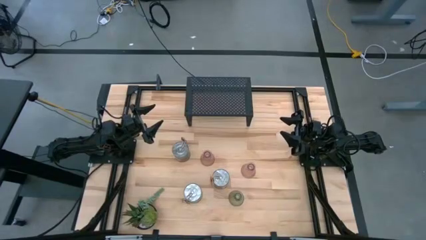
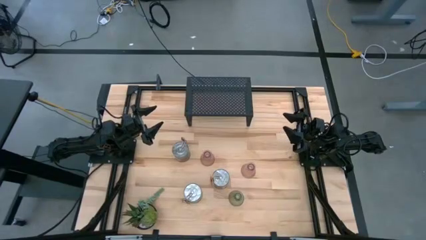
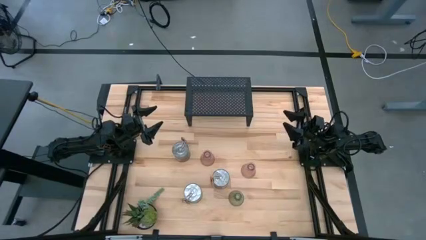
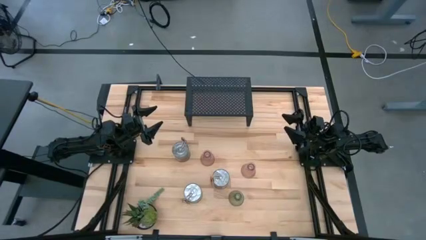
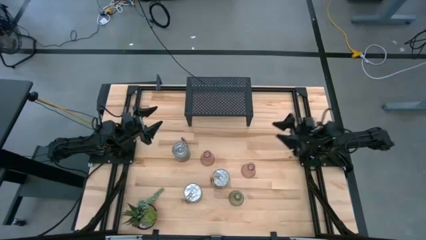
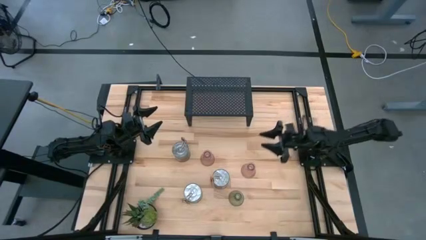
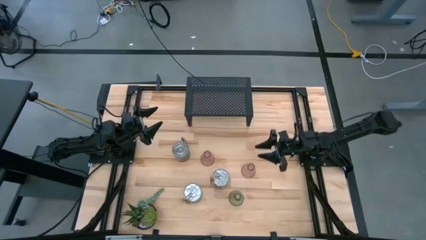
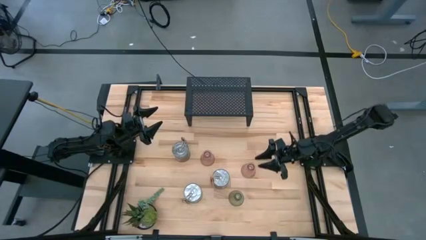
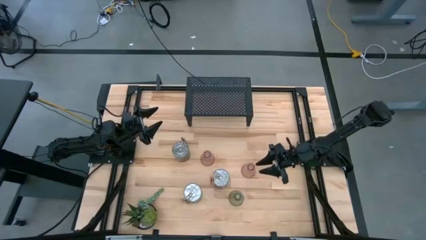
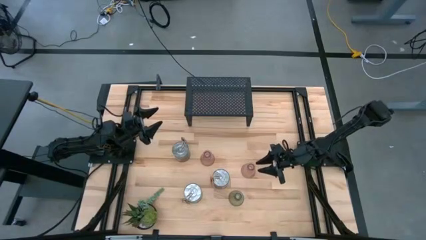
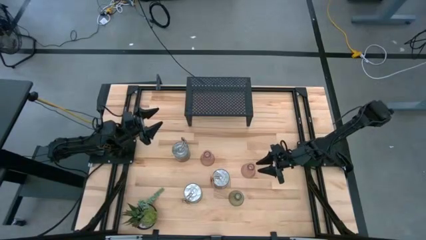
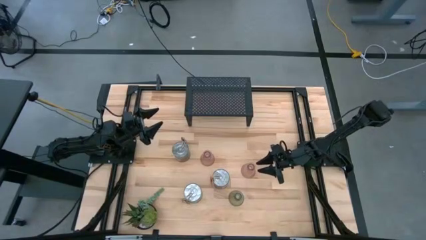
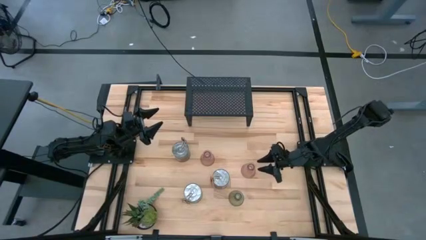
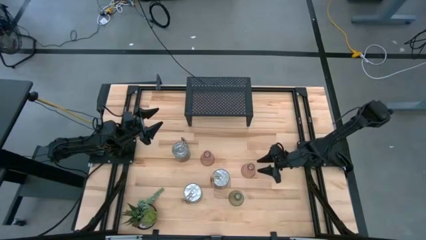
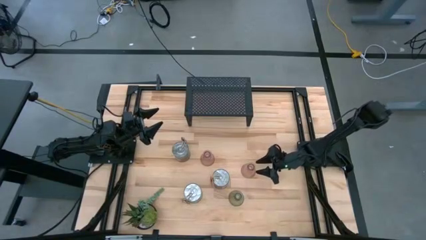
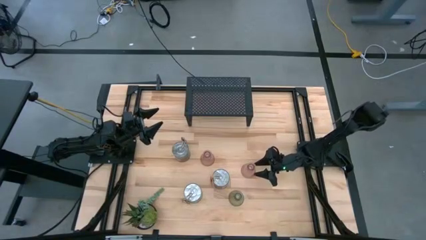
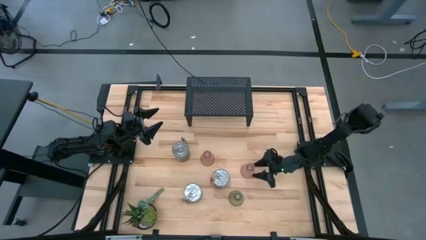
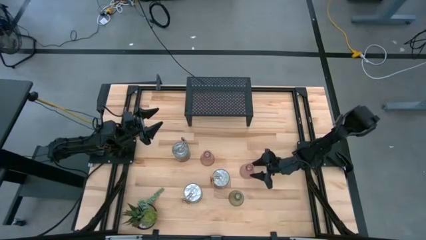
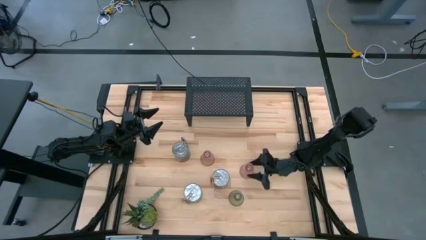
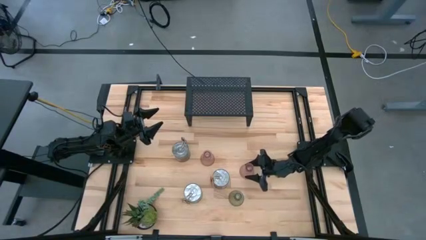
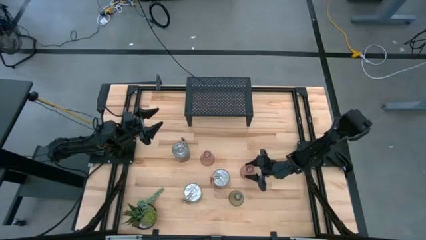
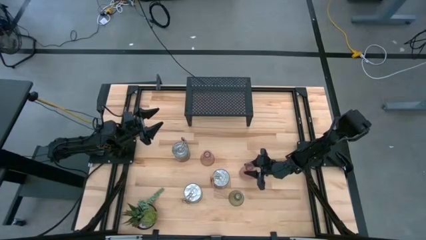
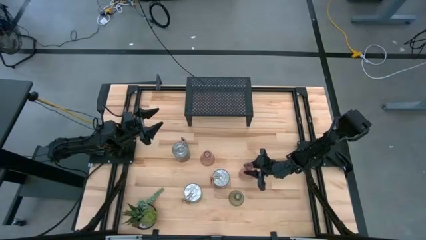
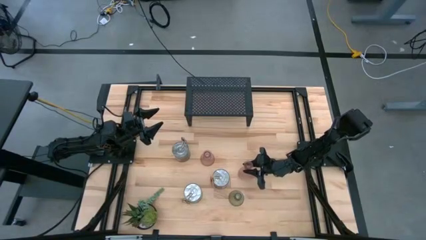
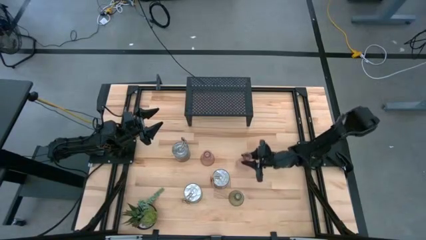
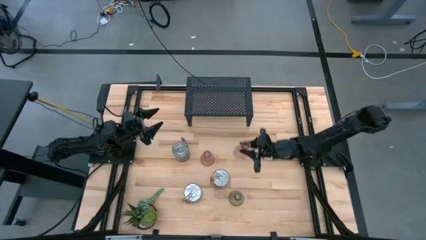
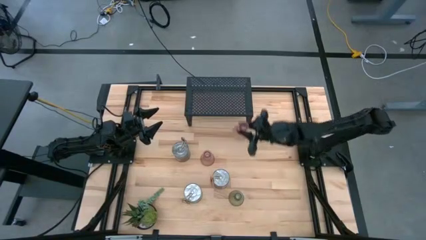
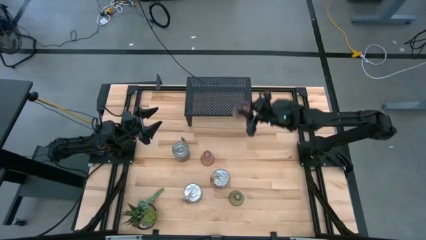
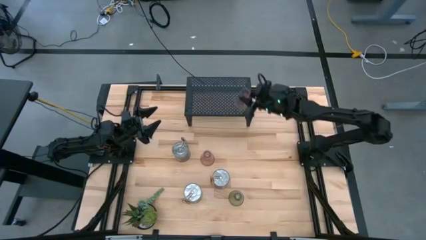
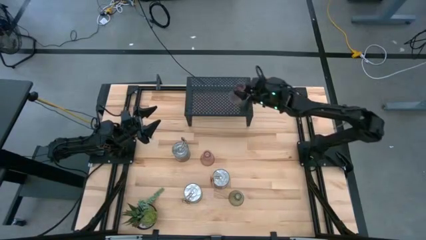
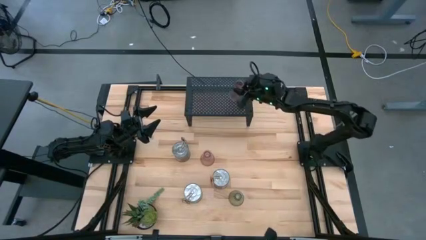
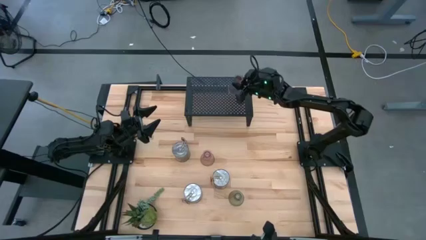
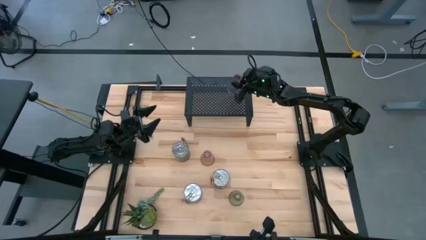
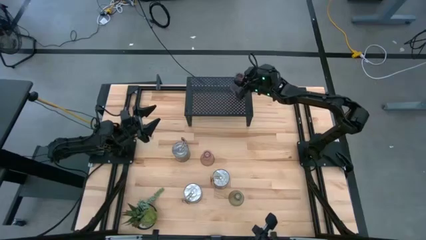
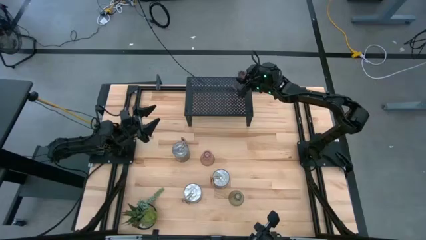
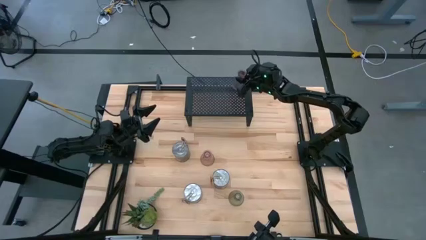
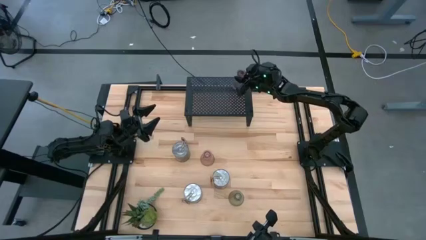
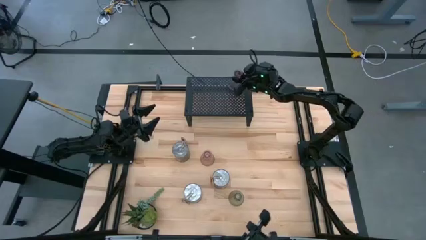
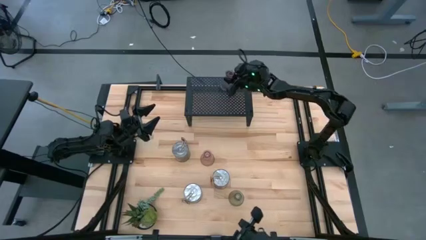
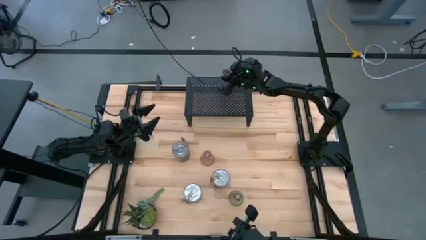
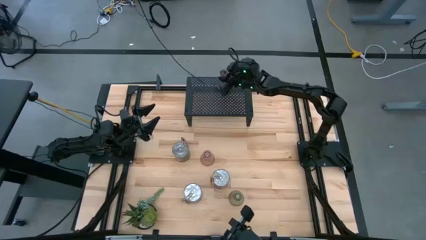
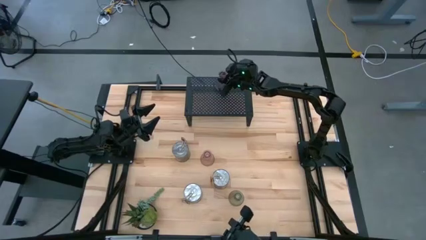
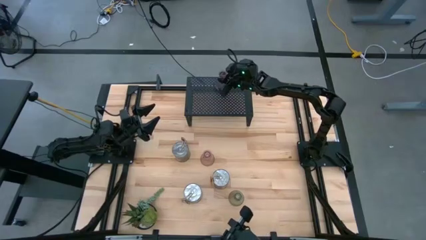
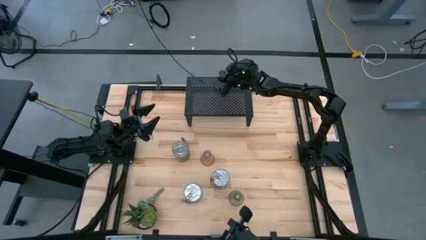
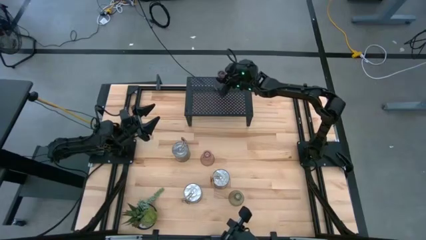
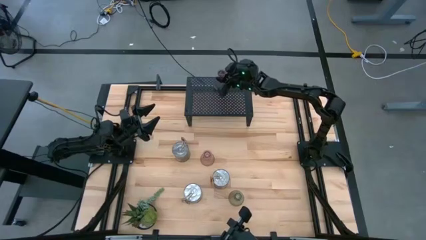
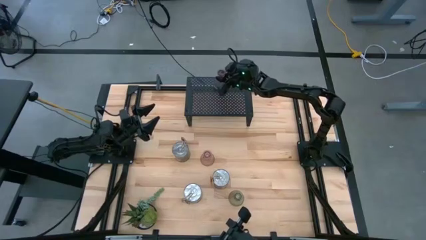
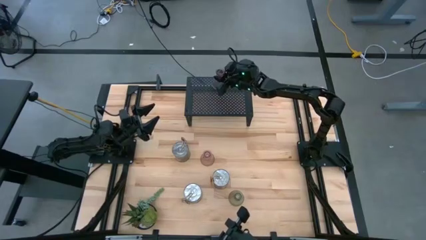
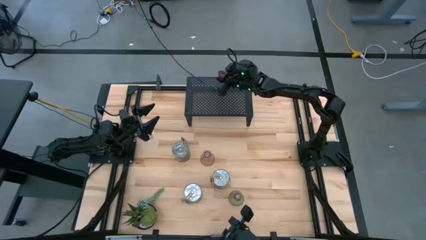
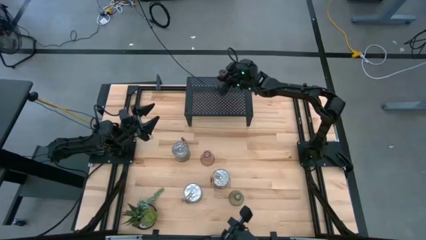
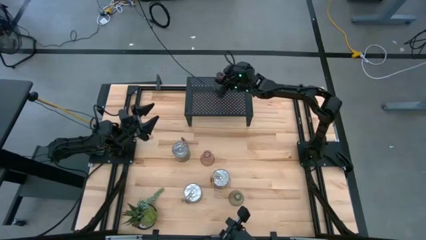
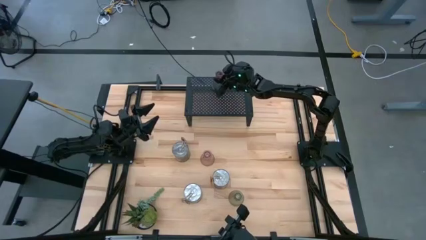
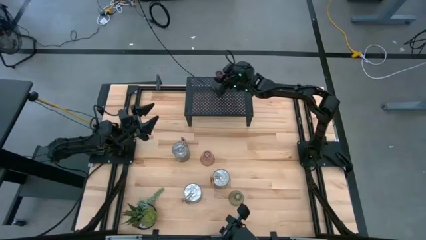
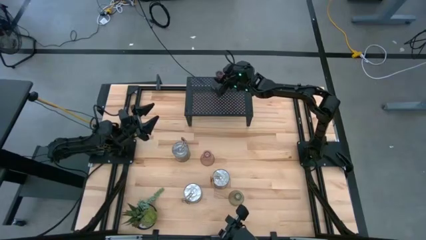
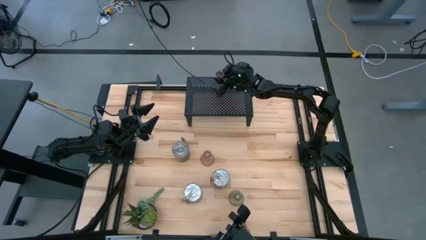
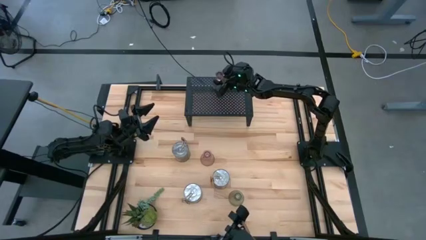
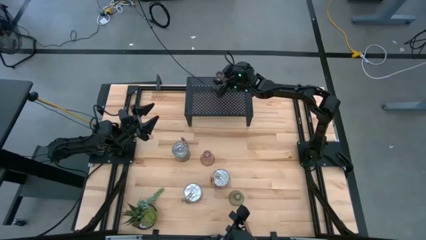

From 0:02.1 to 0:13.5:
Task: Pick & Place candle stick holders
Put the right red candle holder on the shelf

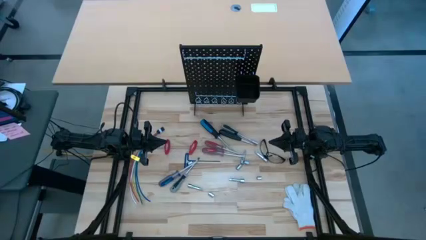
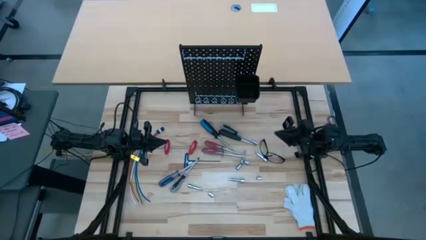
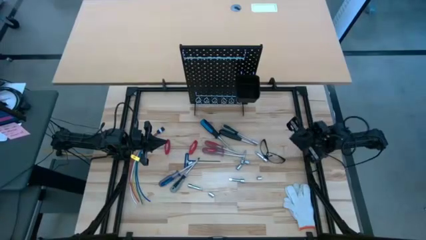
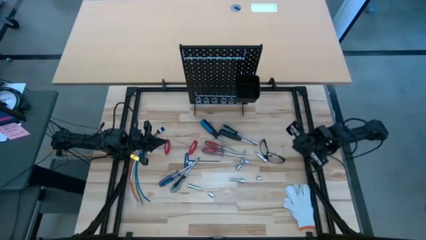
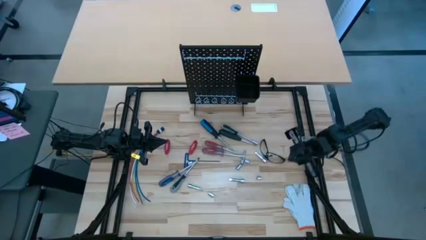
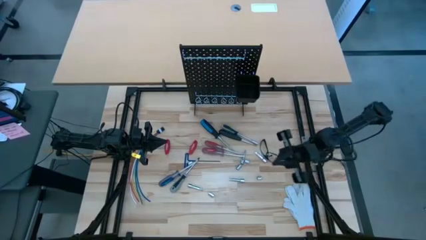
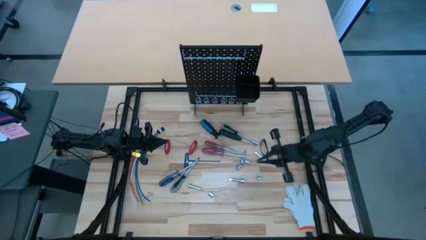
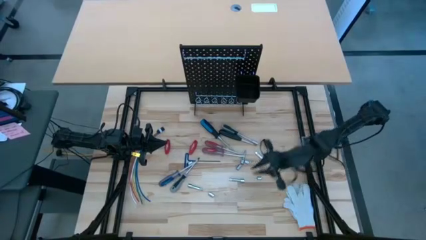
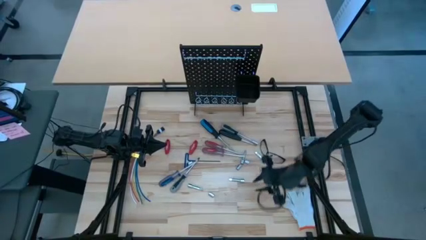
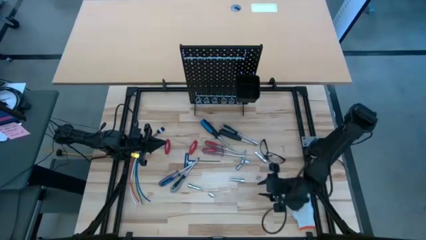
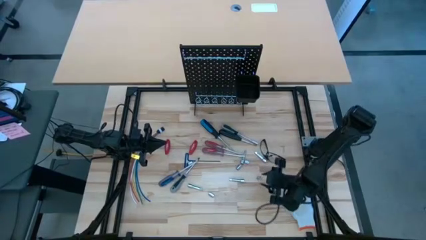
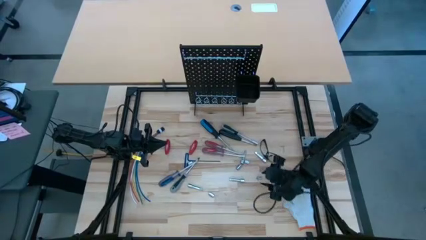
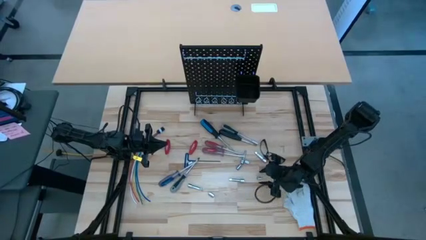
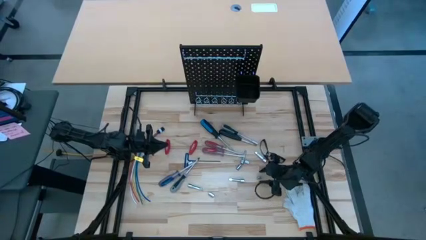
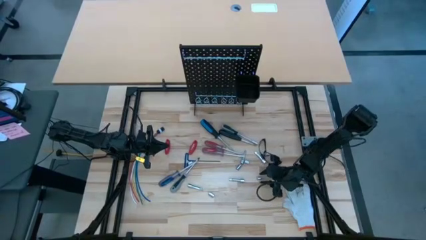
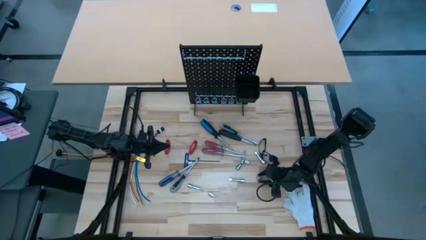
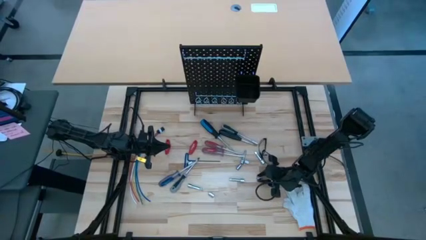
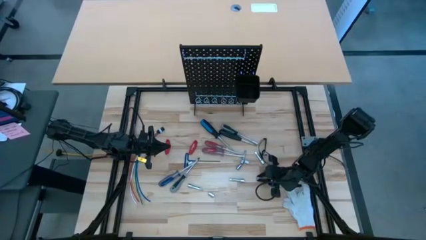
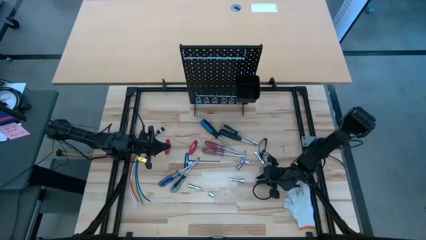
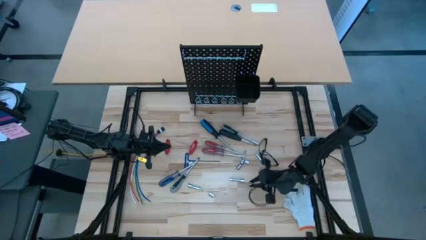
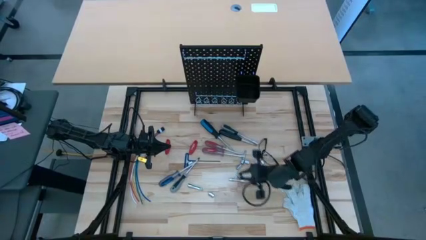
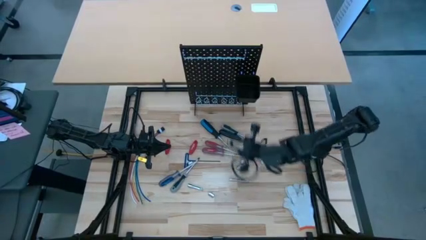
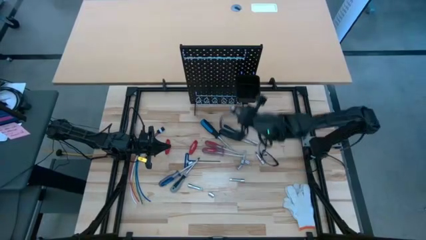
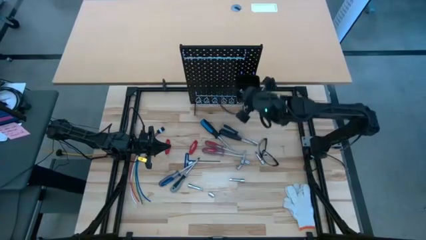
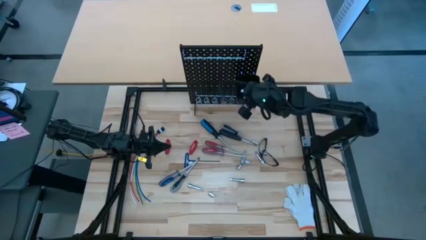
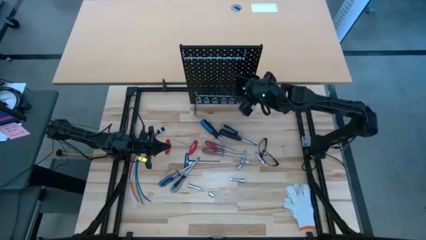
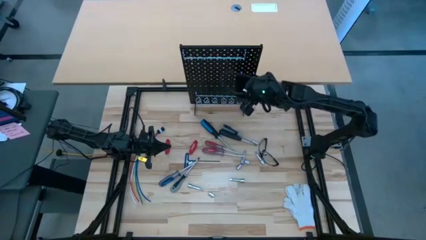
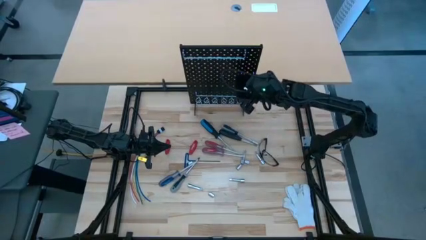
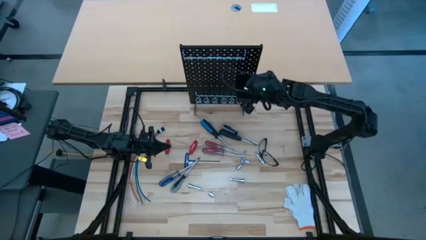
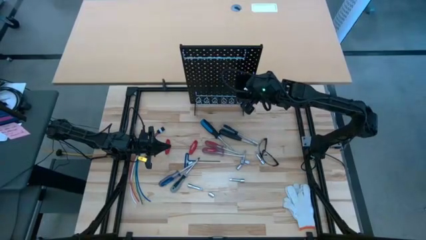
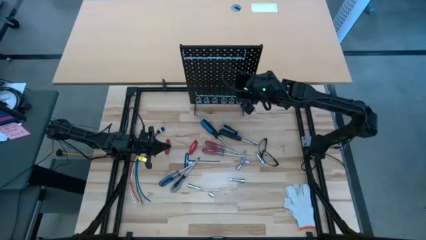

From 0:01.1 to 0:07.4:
Task: Hang tools onto peg board
Put the socket into the bin of the pegboard
